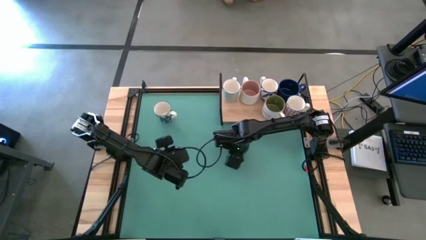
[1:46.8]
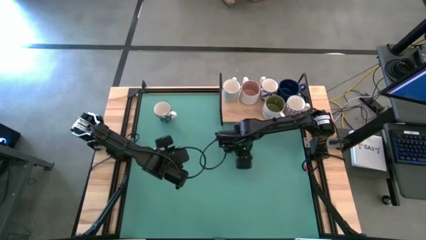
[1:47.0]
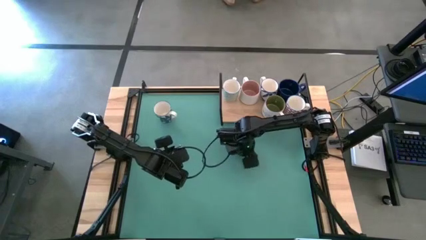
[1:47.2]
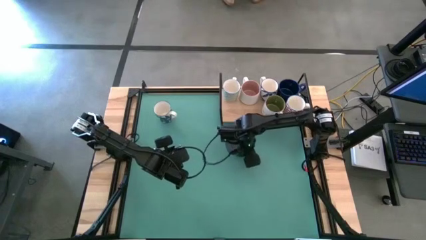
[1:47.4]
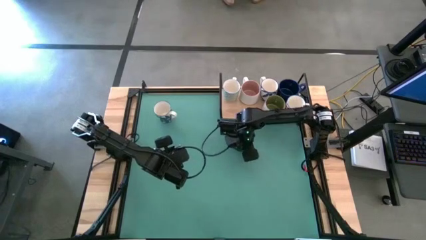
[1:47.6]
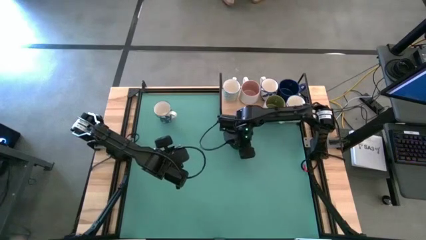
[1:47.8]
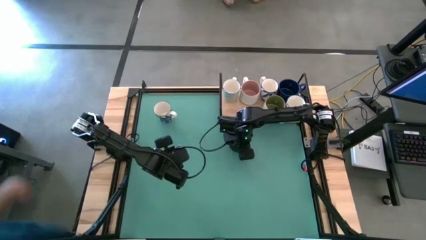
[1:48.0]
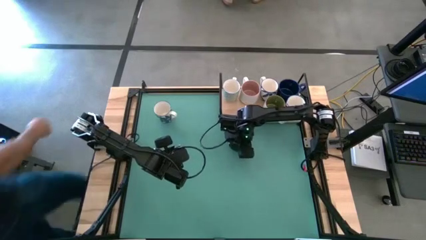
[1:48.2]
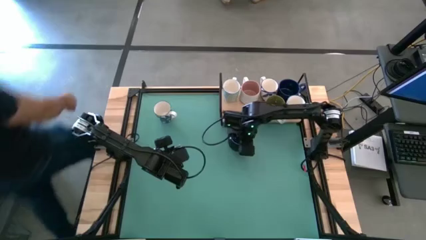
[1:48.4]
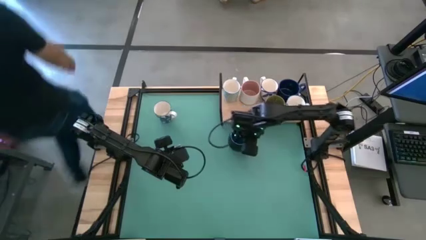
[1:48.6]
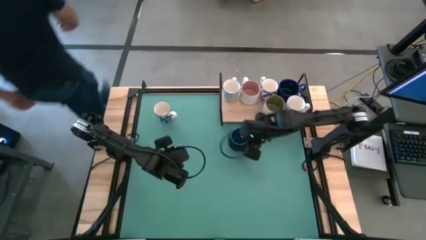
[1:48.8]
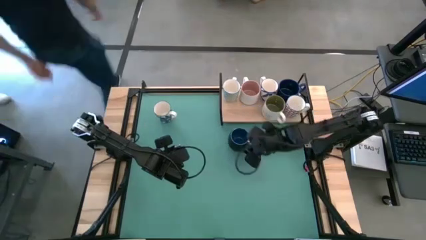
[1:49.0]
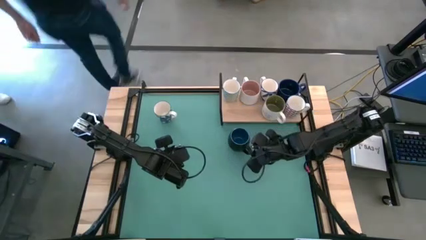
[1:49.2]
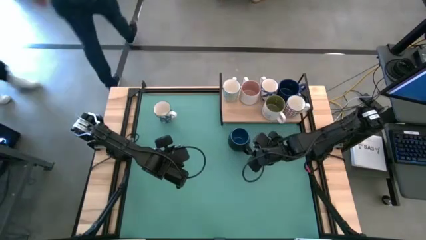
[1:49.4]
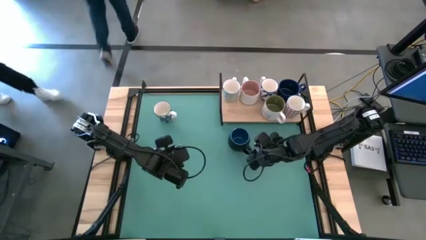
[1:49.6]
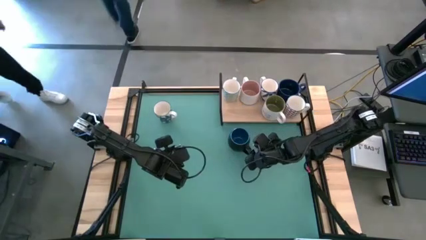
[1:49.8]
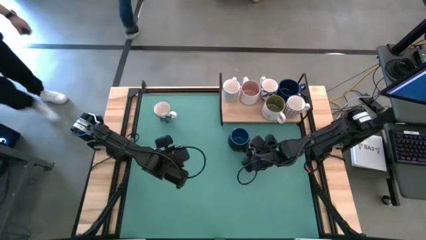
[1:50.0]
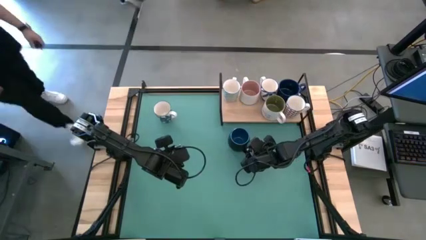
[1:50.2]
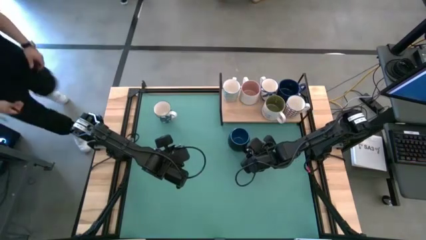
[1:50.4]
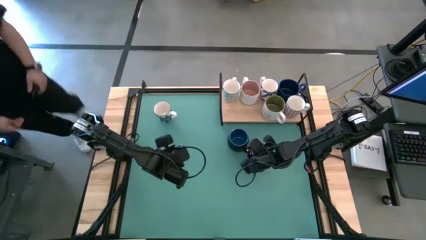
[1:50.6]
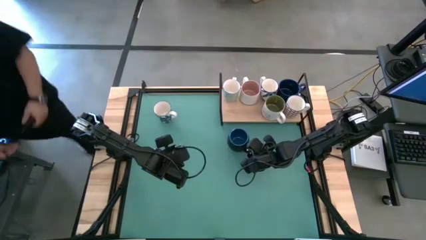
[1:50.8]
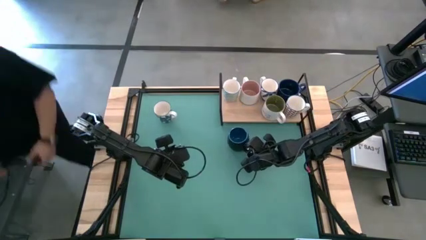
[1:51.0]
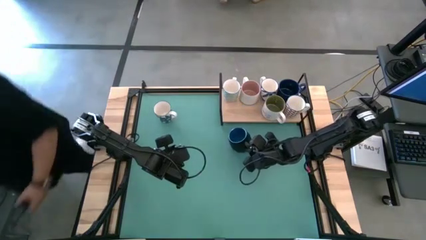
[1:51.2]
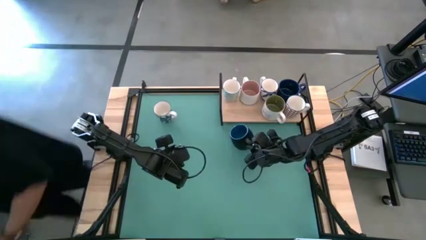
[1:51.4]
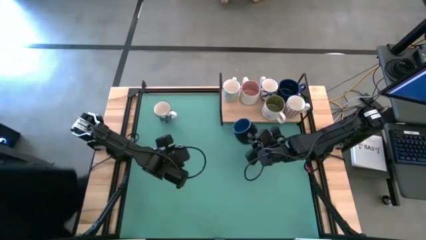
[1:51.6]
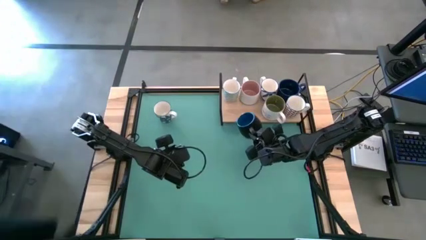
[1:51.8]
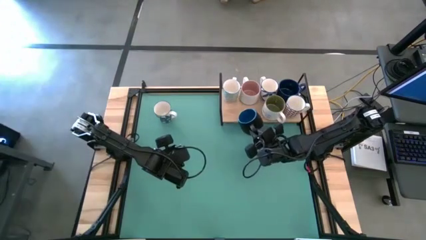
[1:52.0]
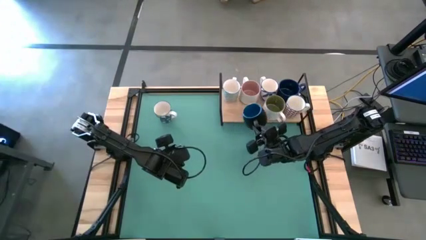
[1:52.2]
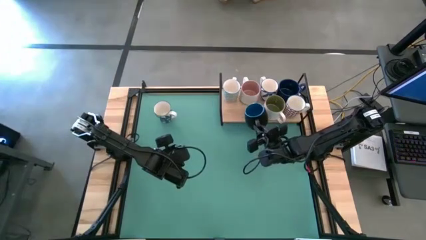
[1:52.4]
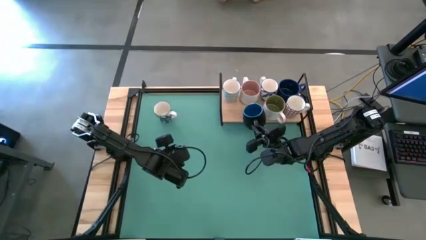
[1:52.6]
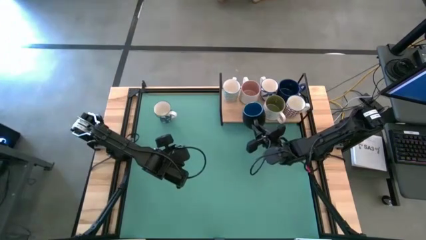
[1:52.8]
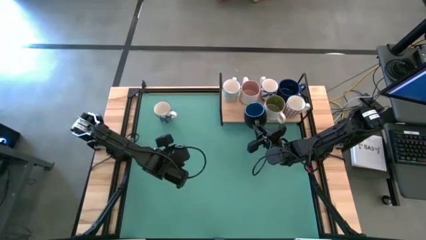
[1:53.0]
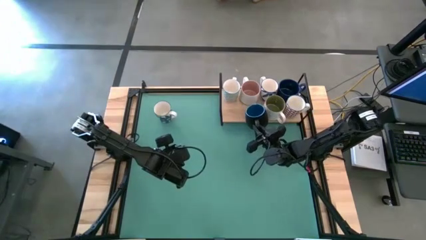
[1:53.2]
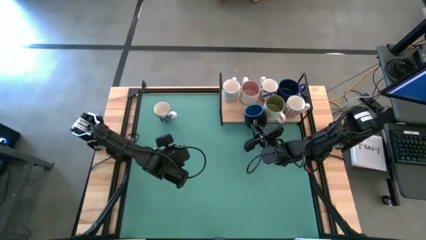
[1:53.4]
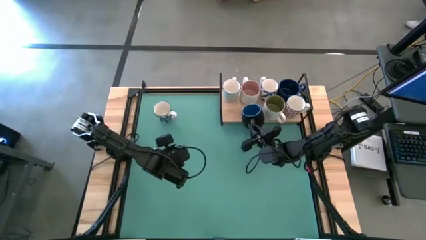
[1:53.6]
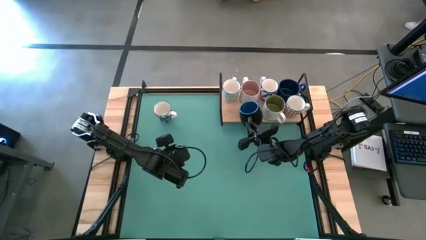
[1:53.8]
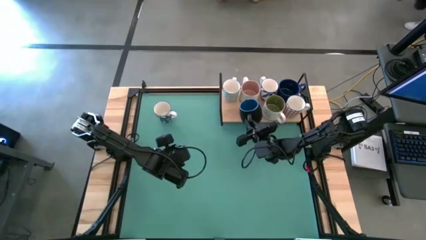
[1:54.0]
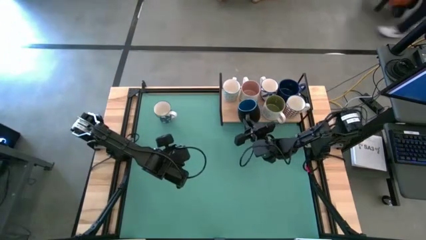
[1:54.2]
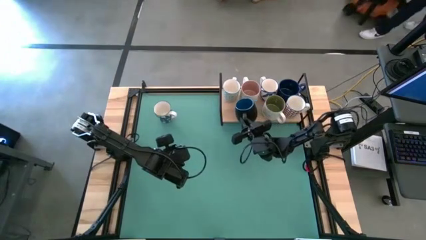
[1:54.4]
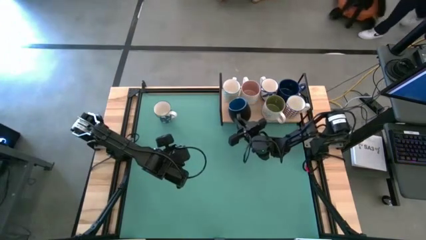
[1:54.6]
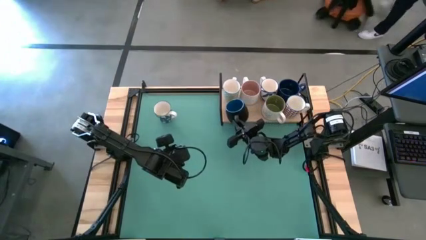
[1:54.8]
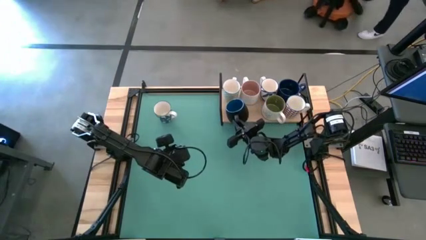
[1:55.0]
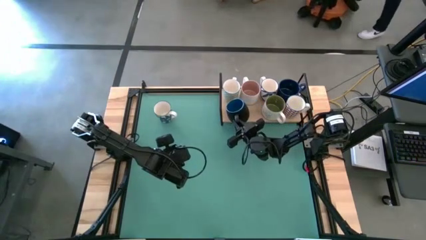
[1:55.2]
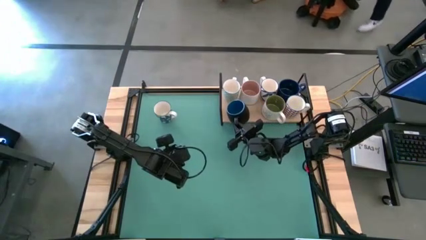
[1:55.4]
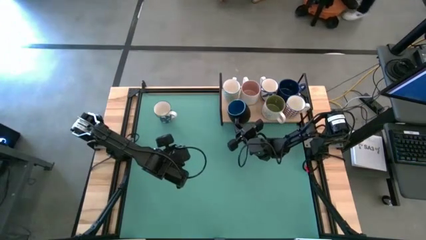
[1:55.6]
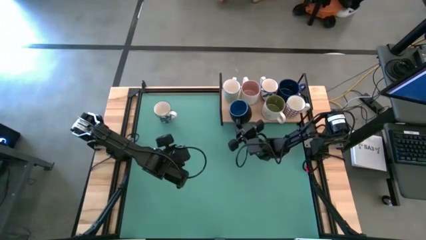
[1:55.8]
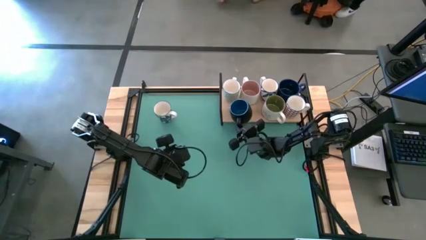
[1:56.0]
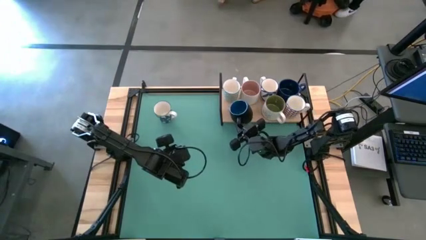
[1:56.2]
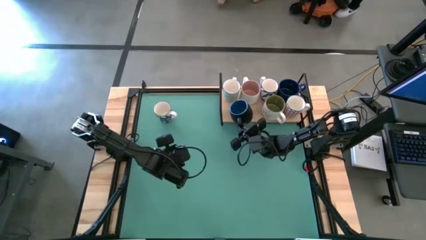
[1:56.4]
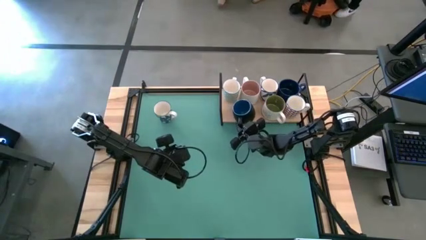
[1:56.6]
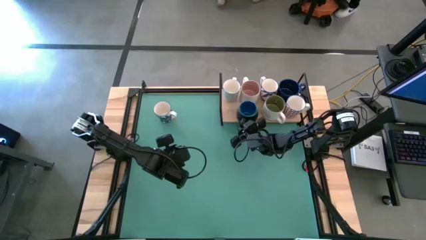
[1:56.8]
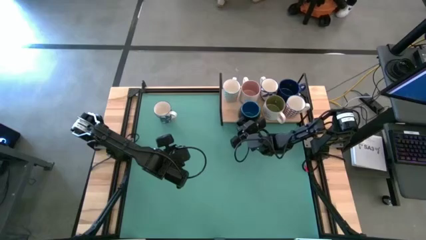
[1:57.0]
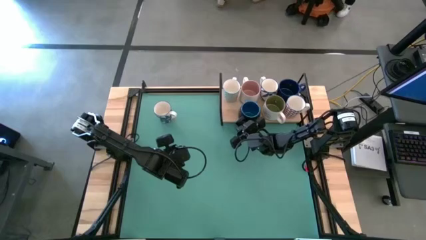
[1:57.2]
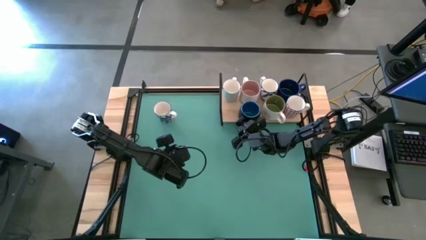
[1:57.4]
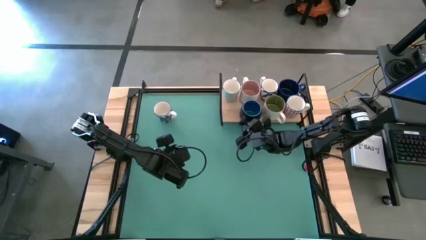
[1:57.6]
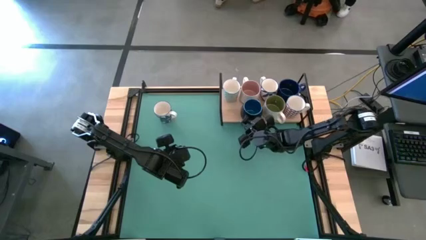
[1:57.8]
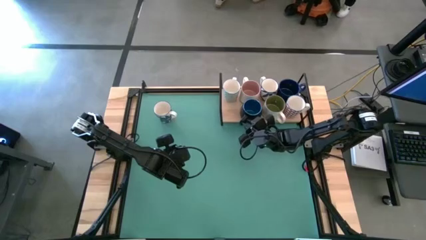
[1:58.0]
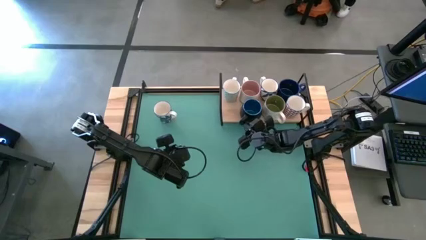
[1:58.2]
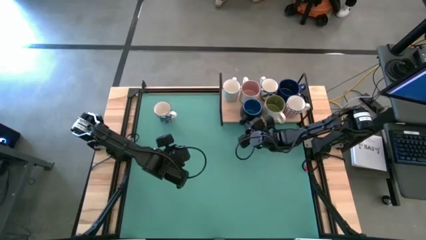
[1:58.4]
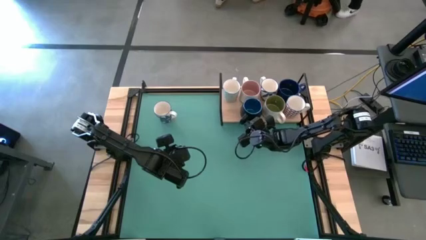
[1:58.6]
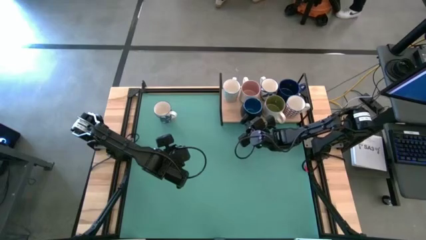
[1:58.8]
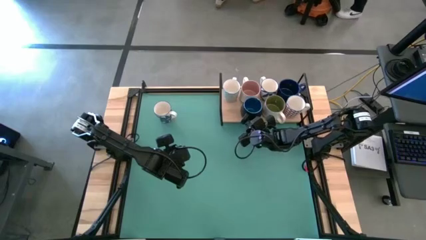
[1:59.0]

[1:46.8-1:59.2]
Task: Place coffee mugs
Put the black blue mug on the shelf
